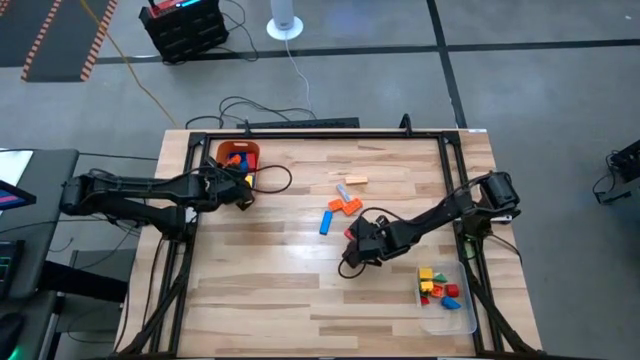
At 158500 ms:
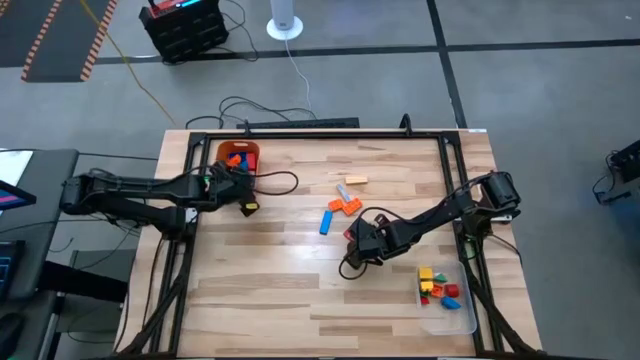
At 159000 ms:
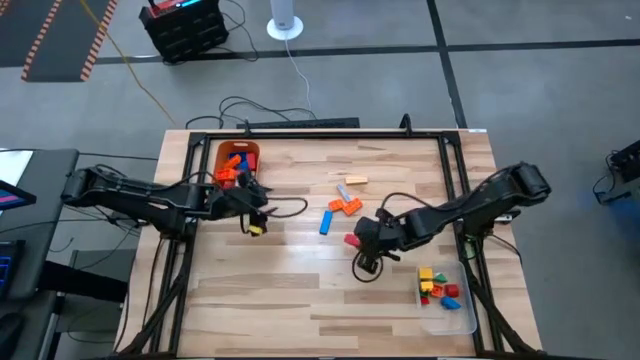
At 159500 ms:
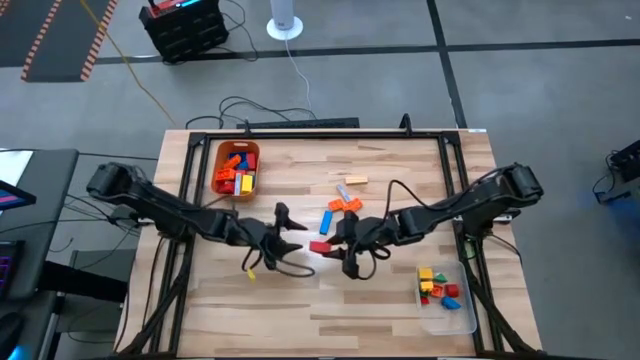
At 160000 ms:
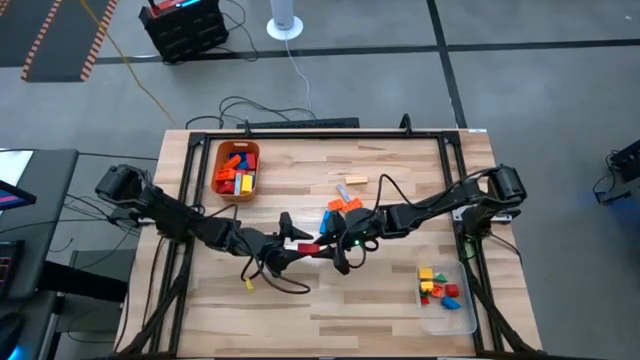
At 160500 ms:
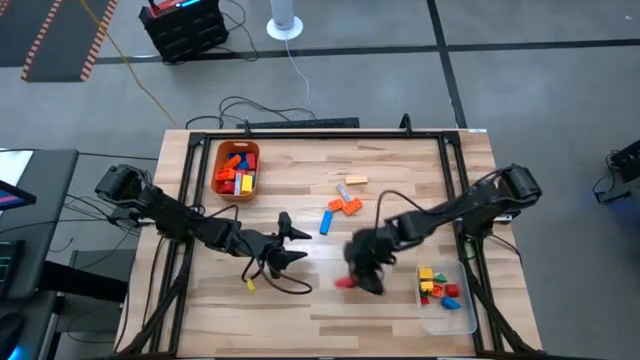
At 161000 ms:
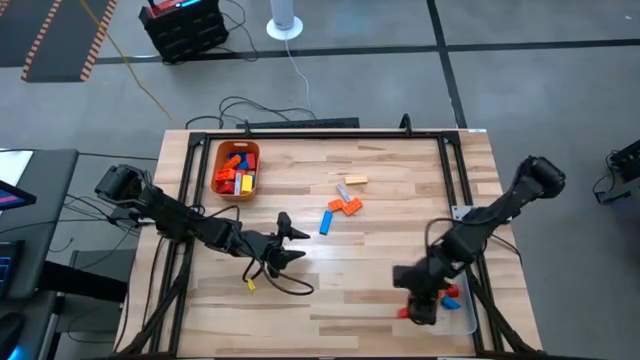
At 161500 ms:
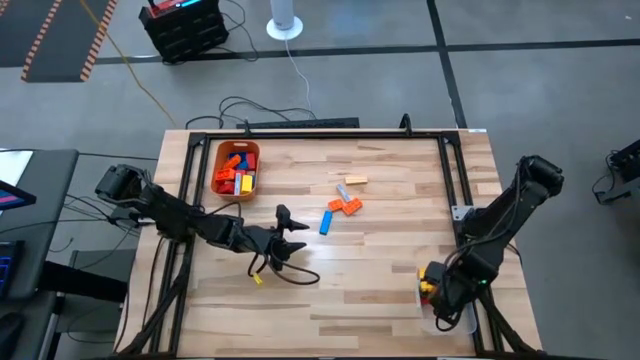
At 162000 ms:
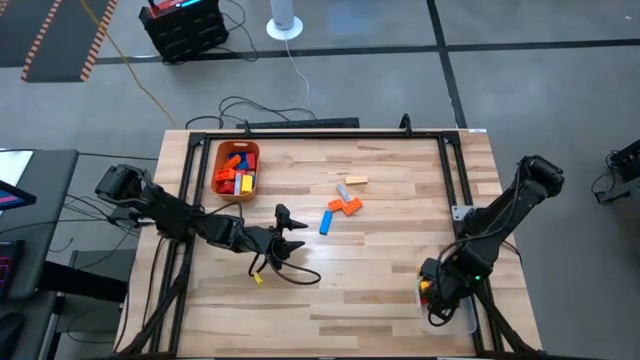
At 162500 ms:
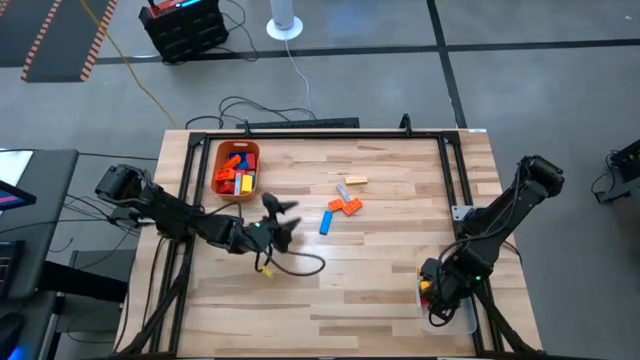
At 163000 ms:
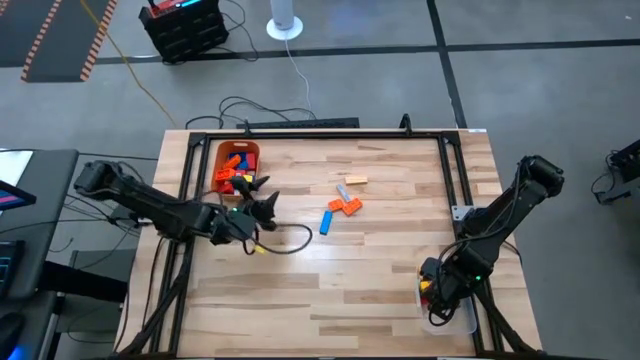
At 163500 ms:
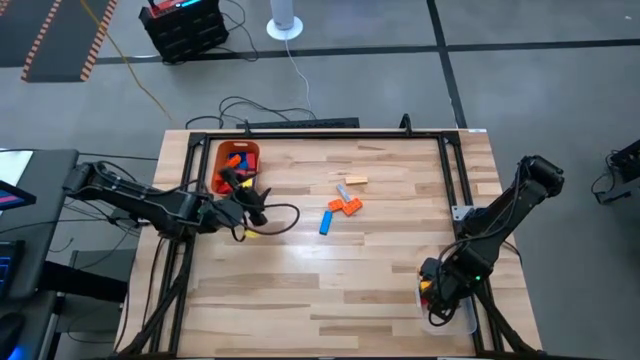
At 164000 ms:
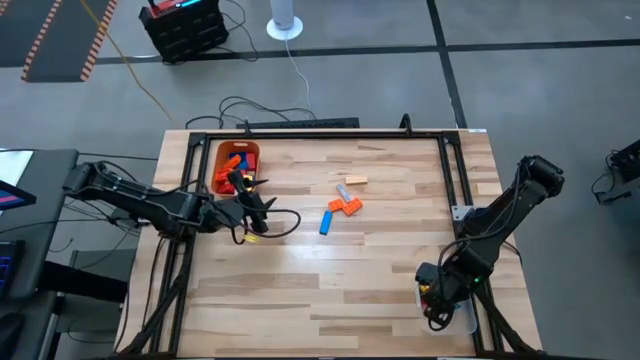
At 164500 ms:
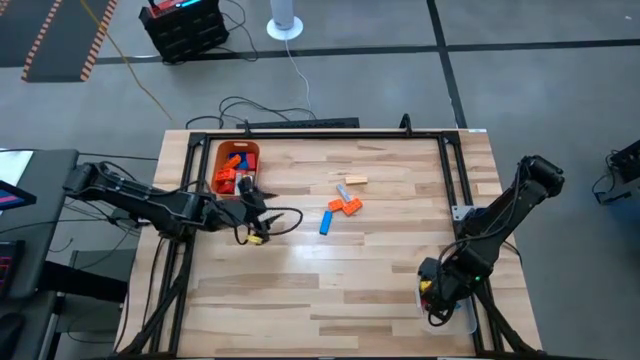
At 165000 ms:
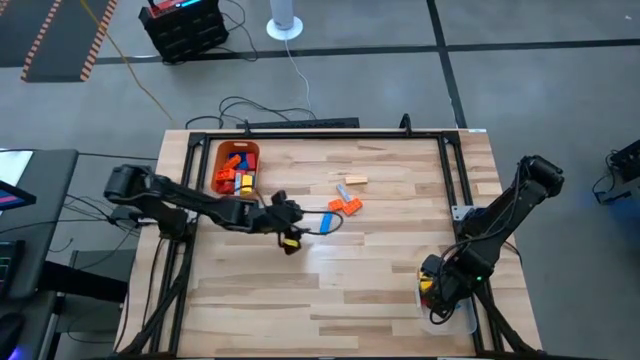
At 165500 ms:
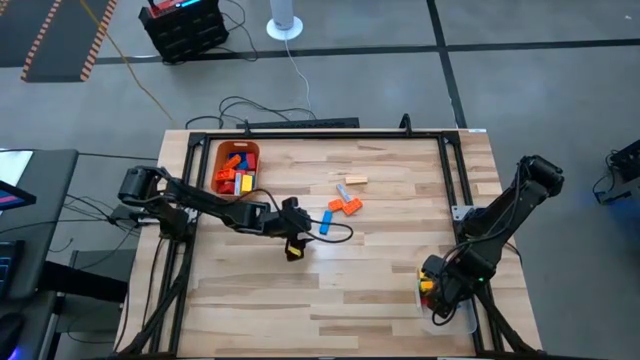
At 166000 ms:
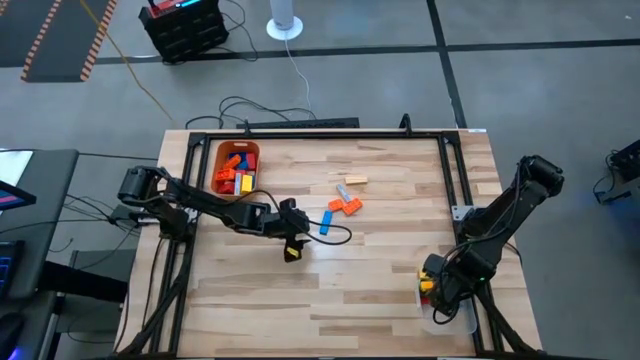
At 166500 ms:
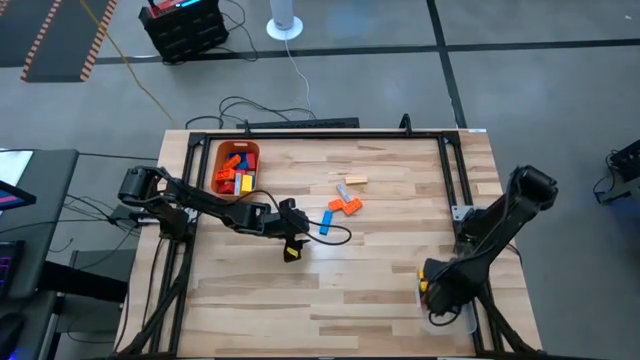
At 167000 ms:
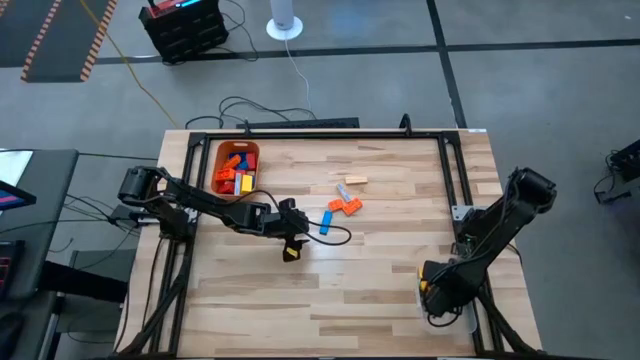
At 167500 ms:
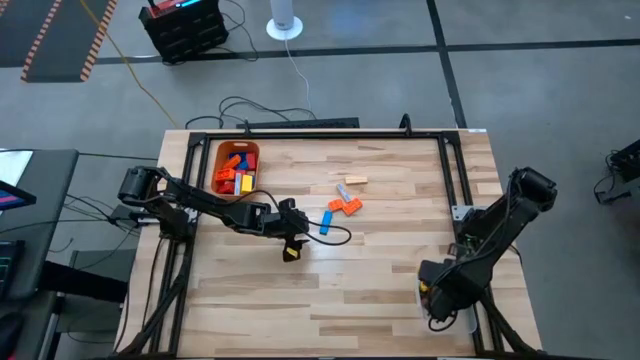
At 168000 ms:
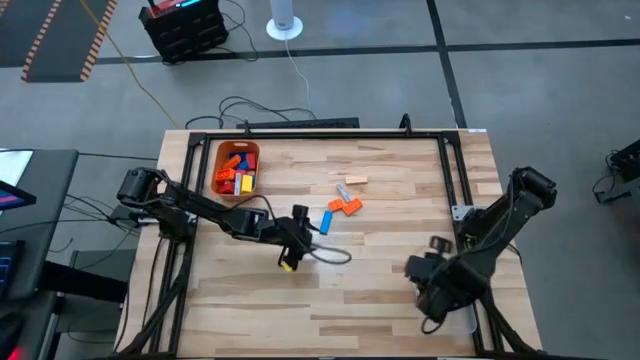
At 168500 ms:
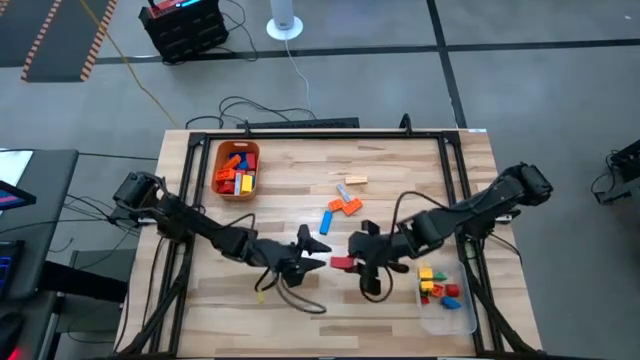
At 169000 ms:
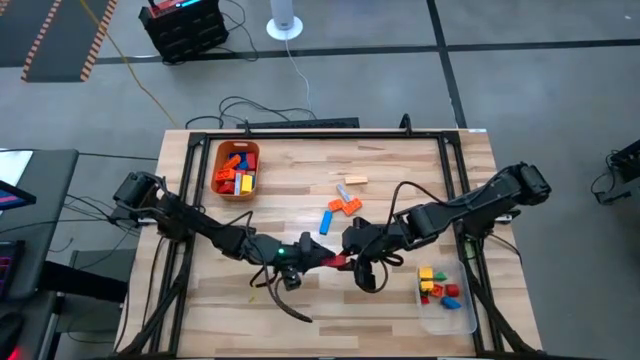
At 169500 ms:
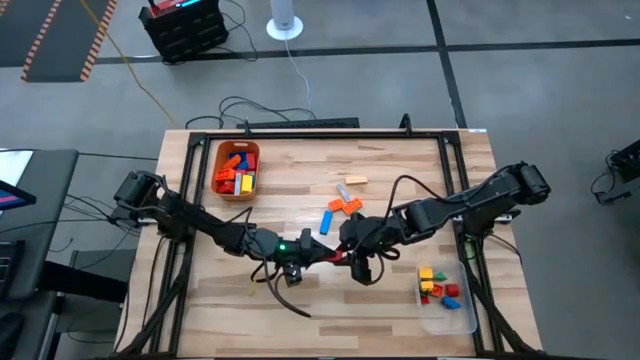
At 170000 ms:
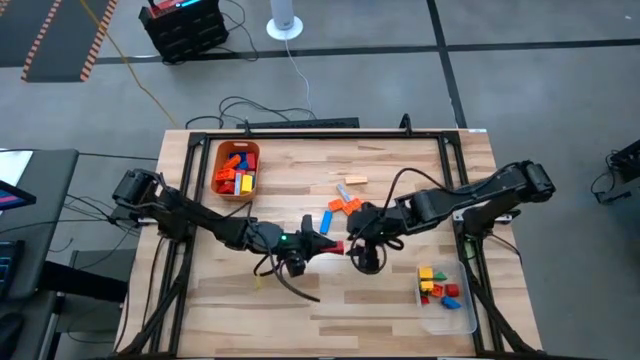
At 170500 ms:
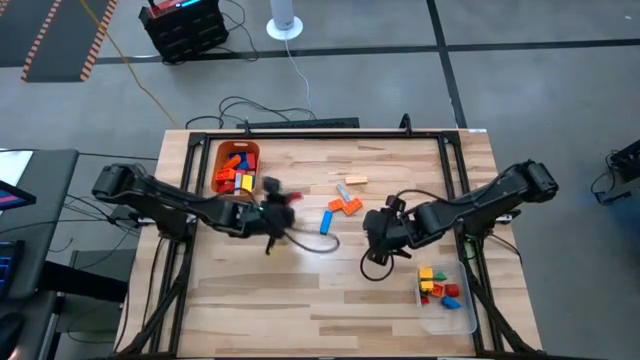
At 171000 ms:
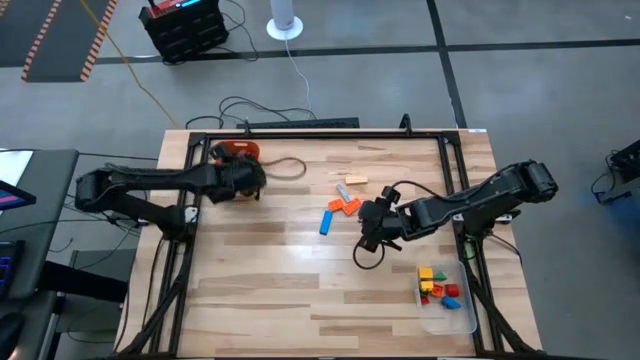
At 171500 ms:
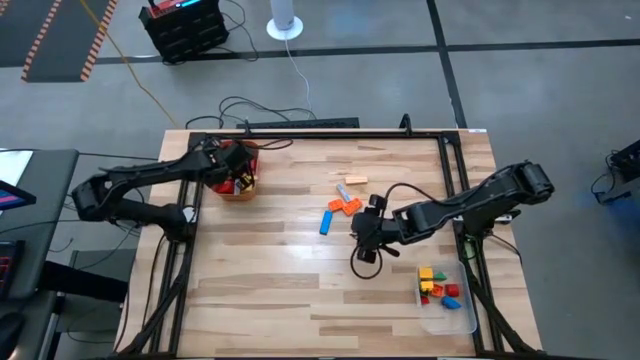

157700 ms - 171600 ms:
Task: Sort blocks by size
Put the large red wooden block into the orange bin

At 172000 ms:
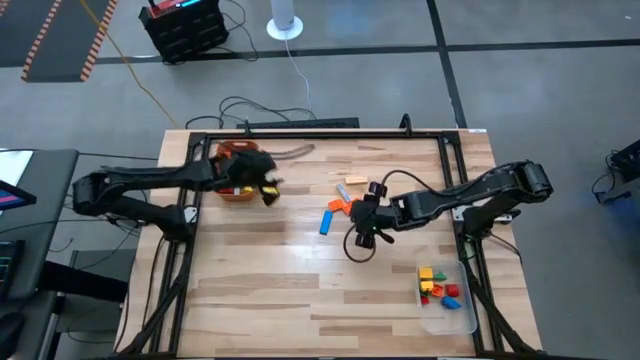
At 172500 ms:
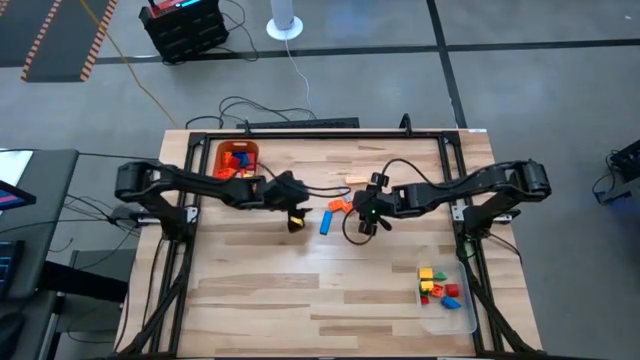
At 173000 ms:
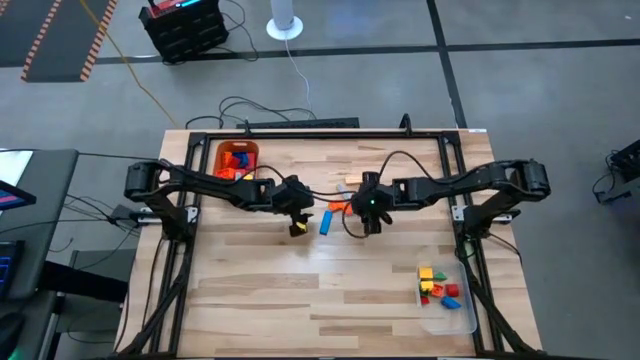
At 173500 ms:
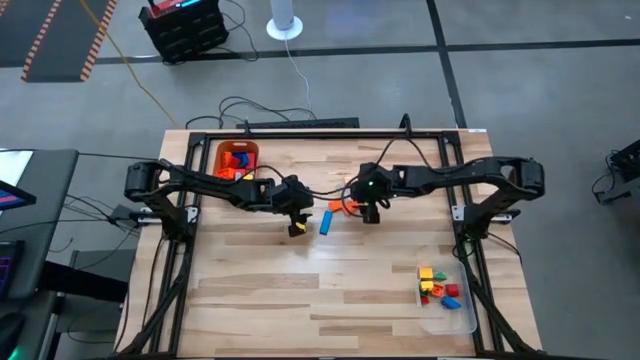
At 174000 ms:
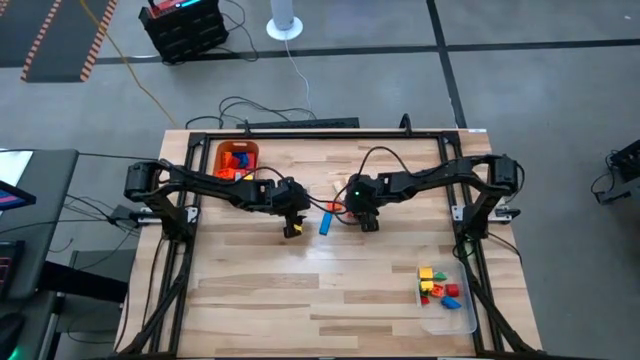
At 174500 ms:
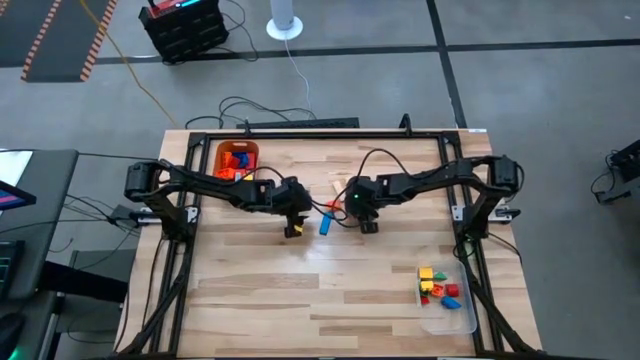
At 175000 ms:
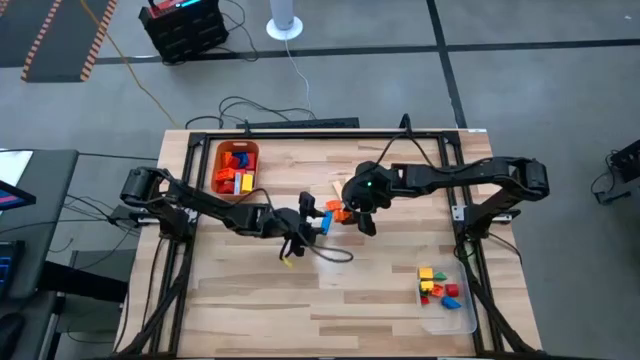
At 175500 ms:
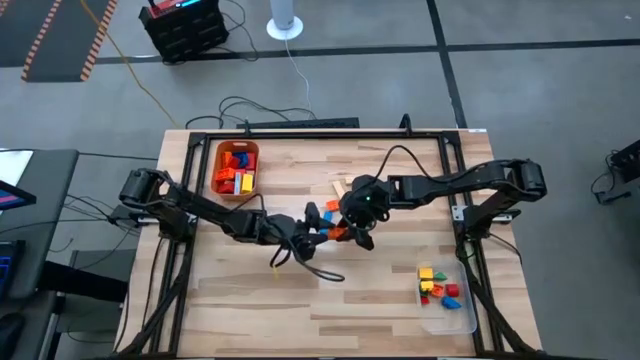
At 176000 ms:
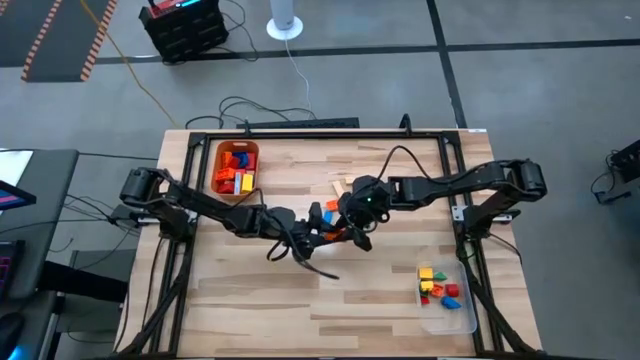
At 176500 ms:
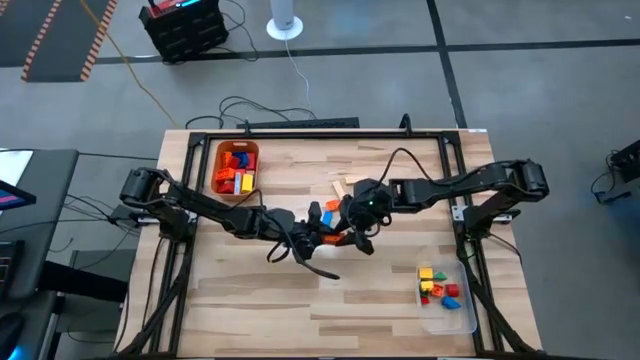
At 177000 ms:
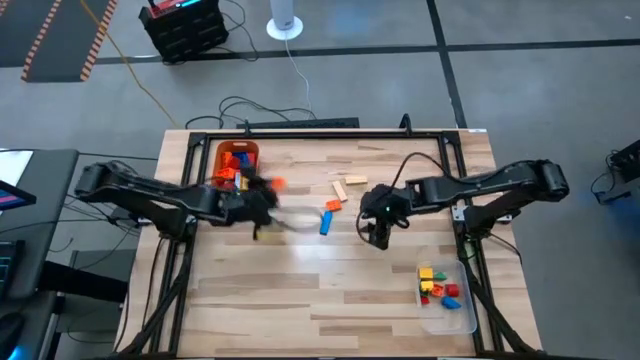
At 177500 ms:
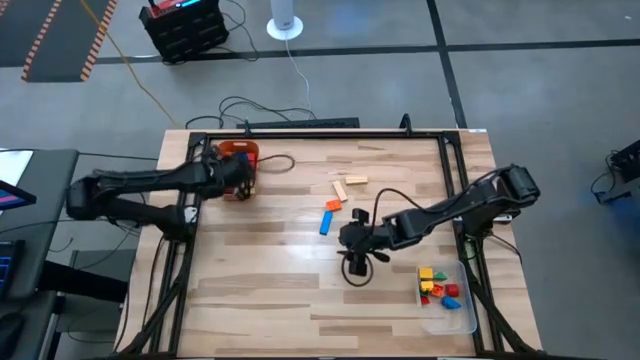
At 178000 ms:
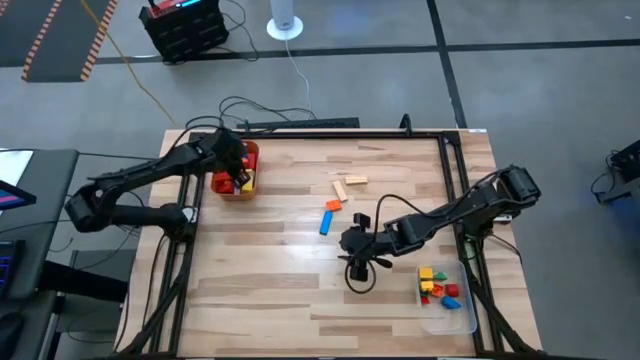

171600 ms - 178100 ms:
Put the large orange game piece into the orange bin

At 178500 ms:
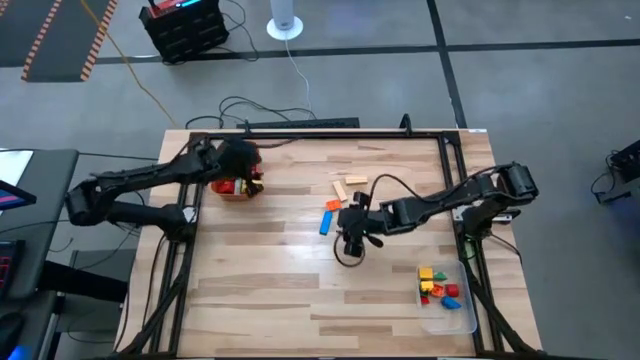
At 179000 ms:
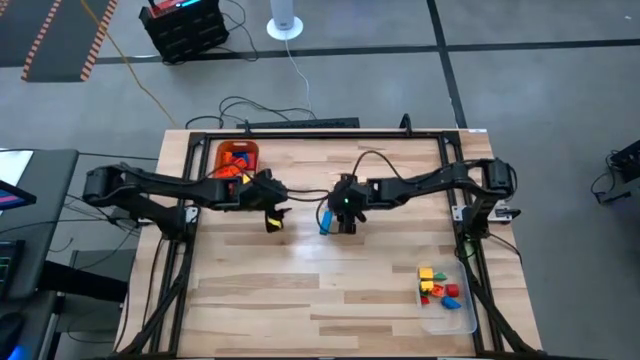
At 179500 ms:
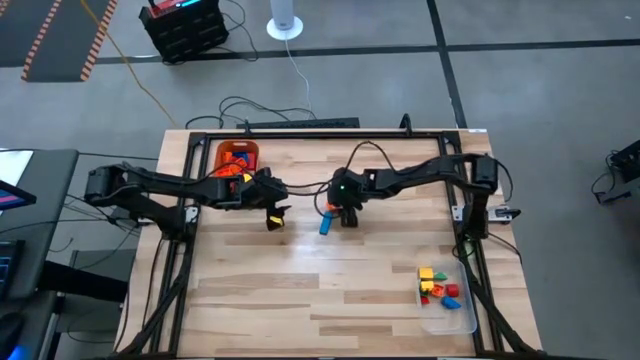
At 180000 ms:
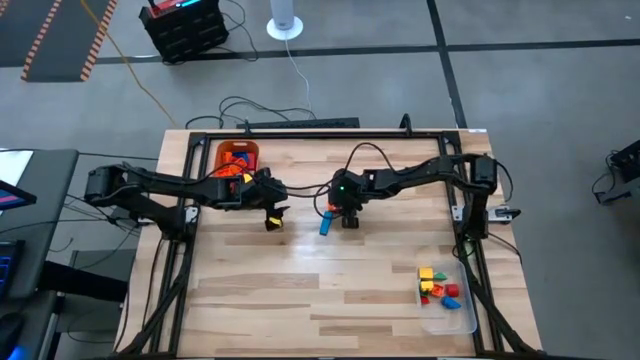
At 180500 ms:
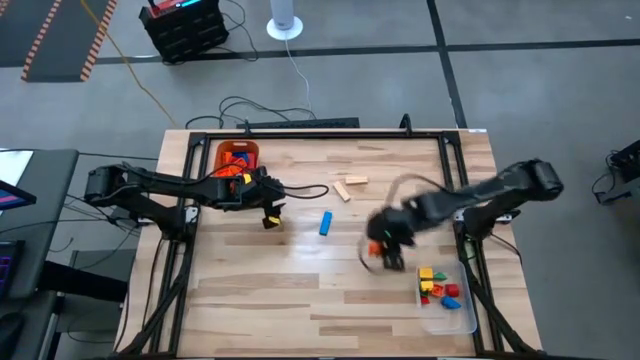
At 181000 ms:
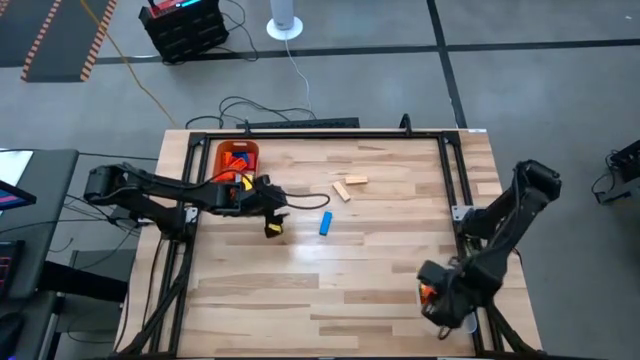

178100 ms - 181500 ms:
Put the small orange game piece into the transparent bin
